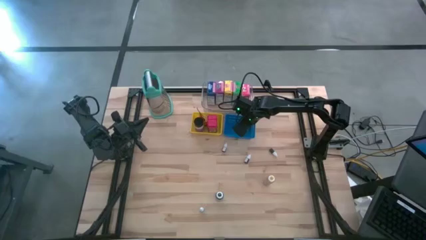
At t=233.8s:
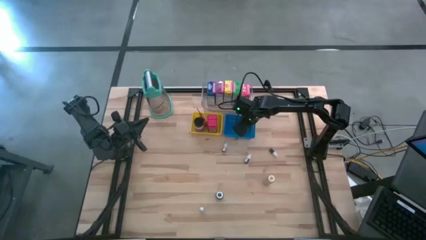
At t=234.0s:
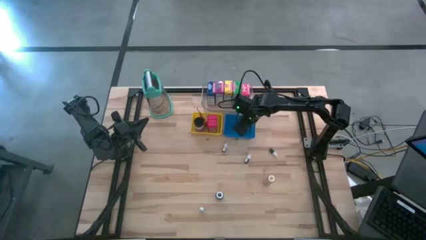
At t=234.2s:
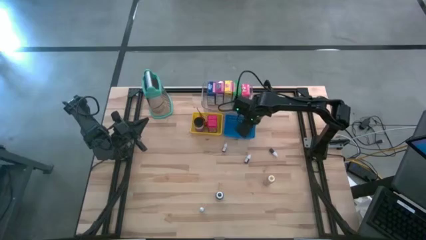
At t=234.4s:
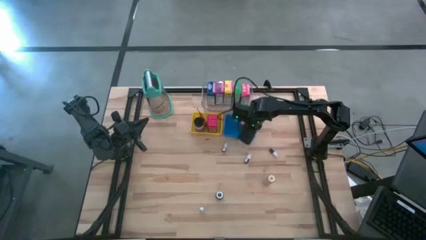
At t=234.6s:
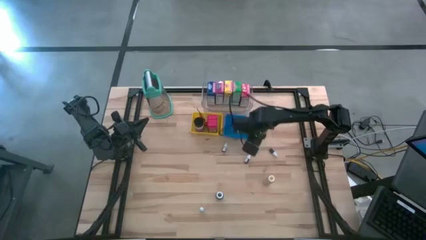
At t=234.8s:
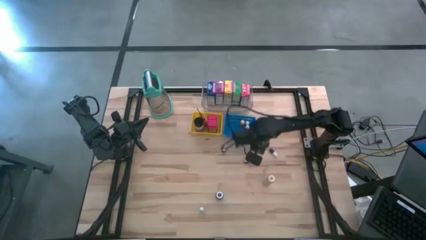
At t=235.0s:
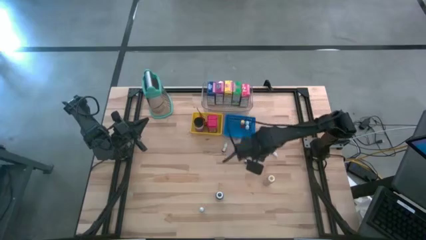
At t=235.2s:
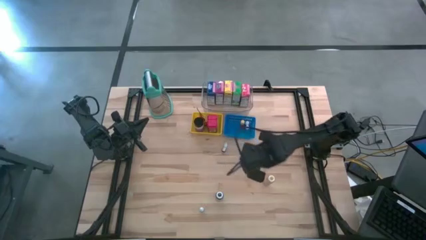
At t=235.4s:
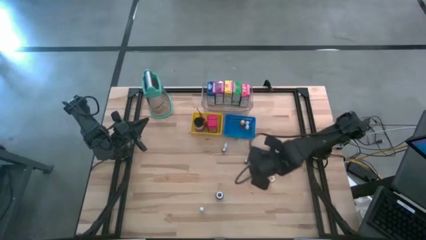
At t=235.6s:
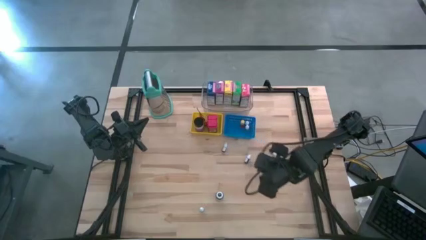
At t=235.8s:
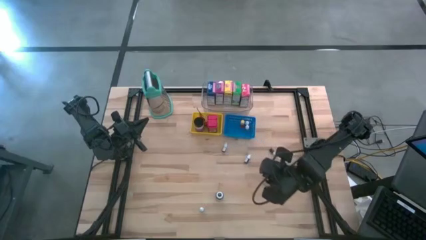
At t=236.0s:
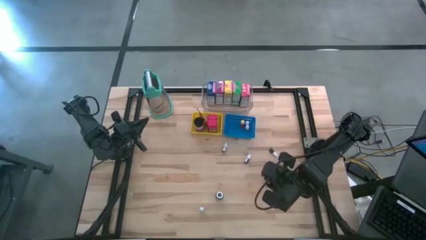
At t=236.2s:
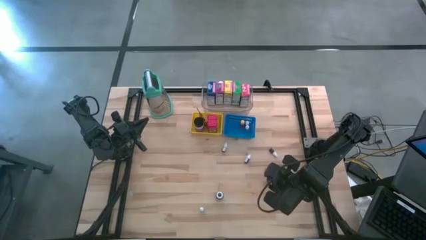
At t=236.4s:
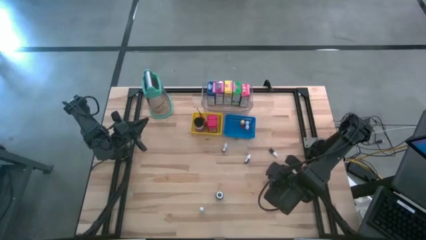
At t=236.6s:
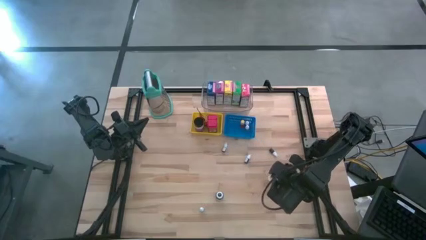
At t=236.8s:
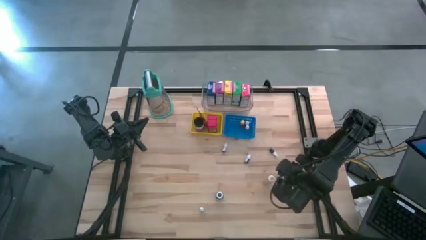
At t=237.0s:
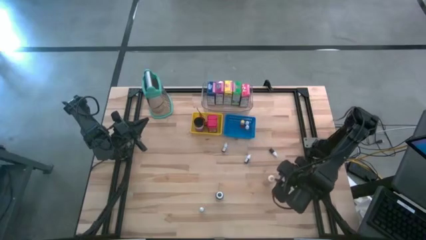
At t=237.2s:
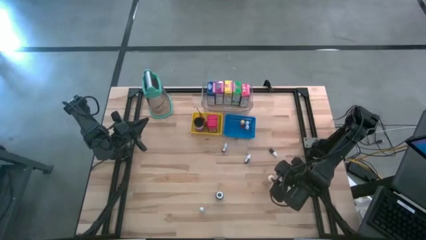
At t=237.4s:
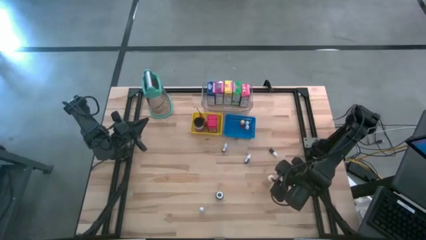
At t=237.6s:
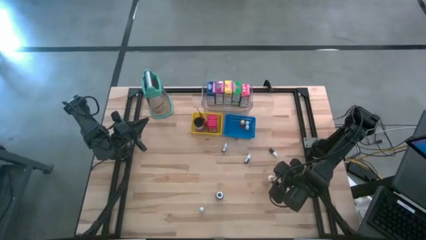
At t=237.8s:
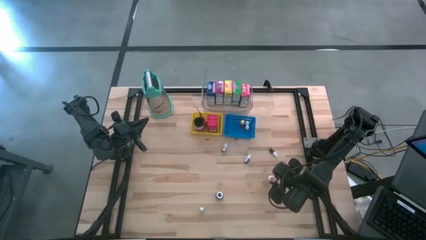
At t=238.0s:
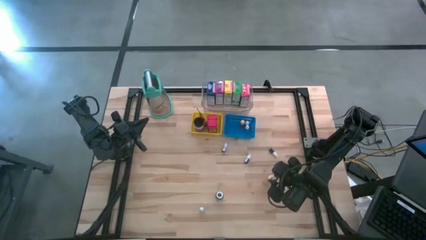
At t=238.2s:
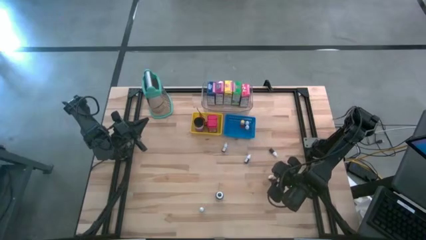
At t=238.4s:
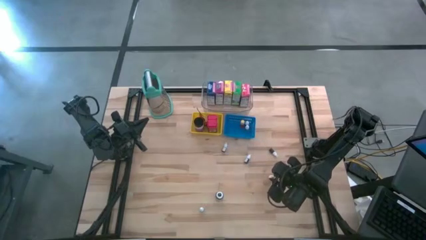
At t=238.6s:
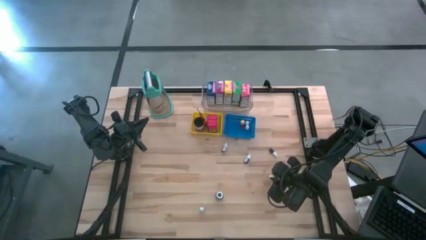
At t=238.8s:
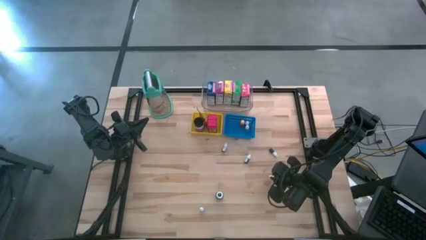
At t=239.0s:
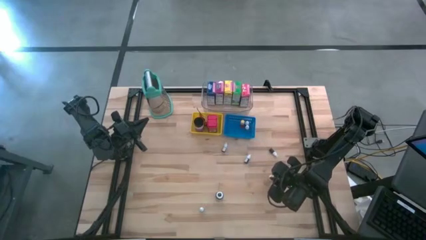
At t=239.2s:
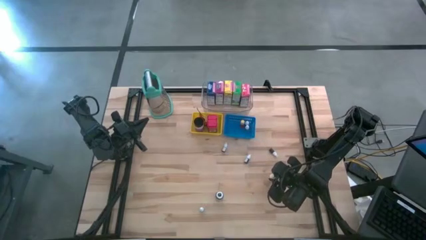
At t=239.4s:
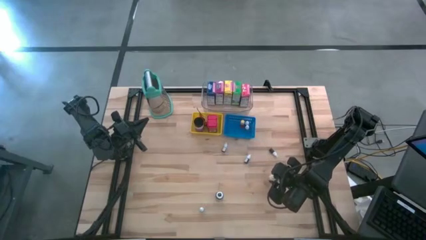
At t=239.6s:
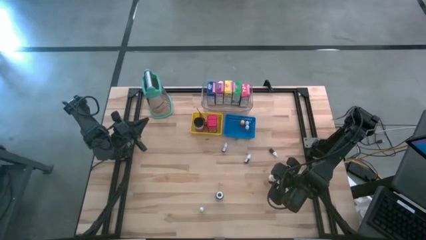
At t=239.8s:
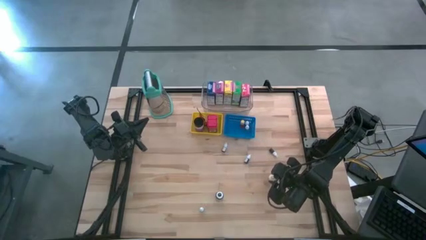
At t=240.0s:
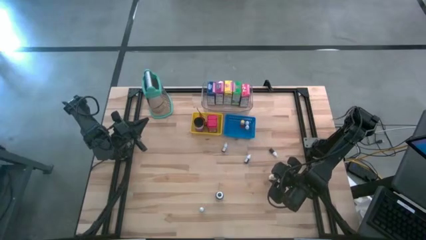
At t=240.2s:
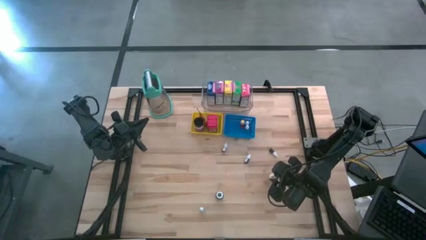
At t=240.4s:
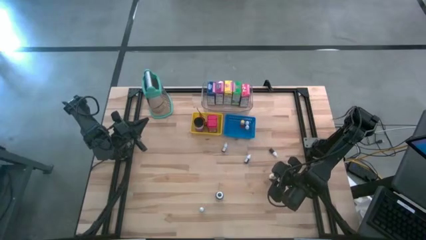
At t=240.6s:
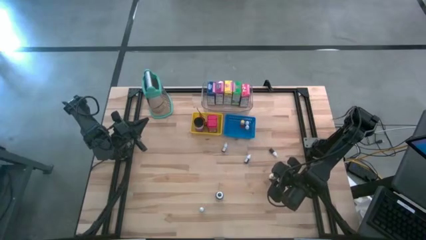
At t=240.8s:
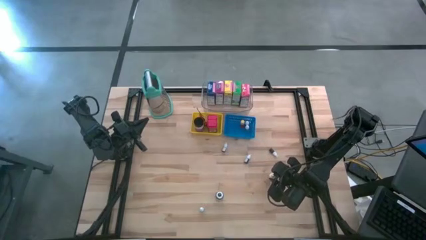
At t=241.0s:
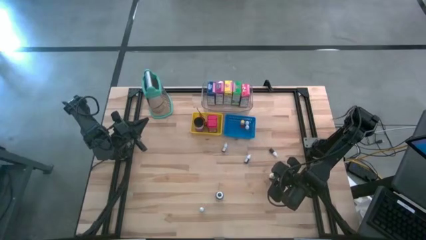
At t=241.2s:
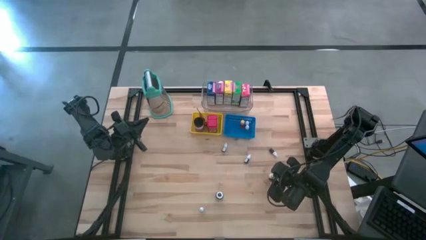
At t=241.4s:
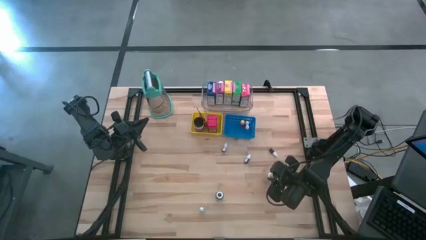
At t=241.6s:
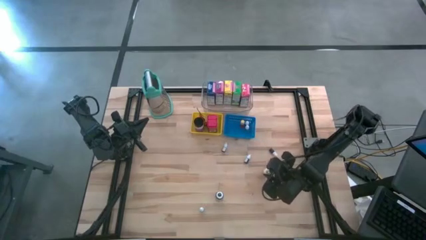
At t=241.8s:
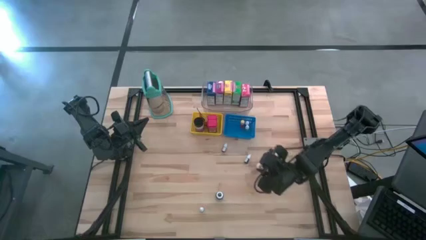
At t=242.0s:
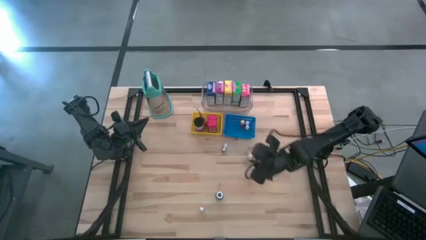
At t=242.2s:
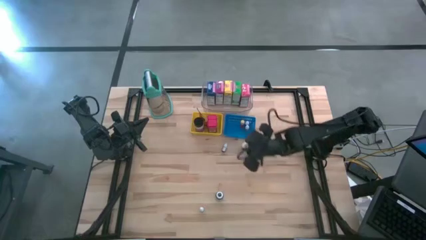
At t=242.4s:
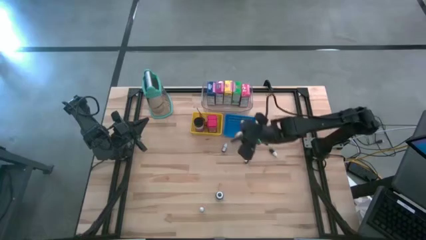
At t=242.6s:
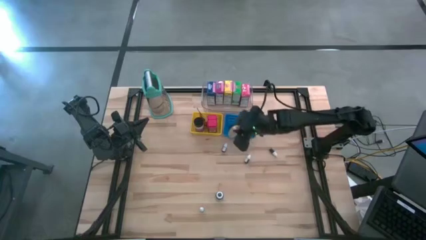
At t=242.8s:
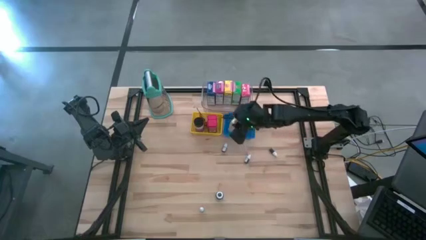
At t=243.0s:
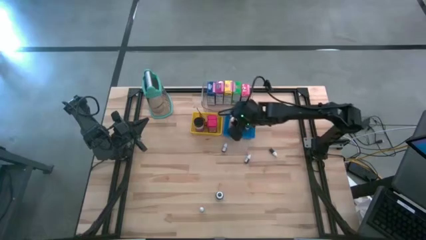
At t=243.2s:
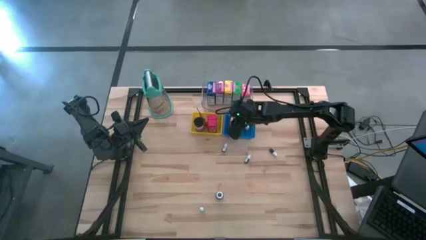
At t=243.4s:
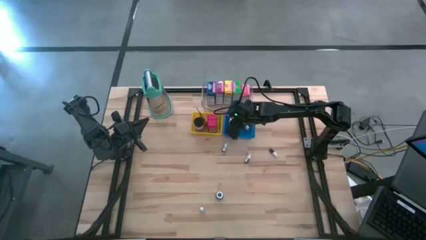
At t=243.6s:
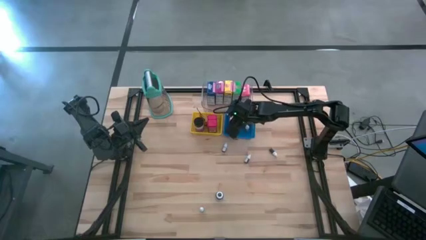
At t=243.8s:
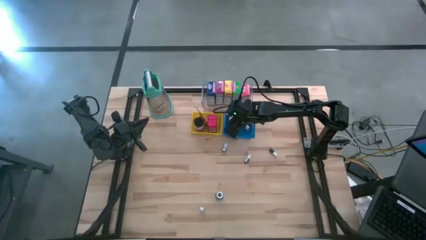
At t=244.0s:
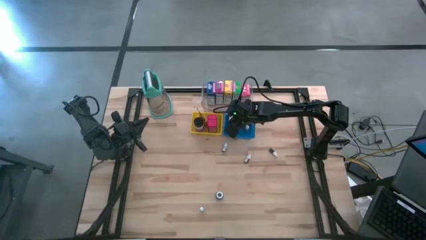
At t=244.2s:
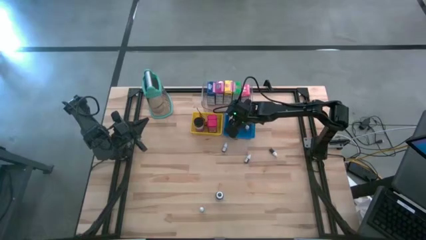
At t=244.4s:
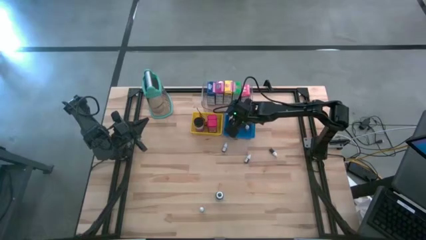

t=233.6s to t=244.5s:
Task: Pick & Place Kitchen Items
Put the yellow food coloring bottle into the blue bin

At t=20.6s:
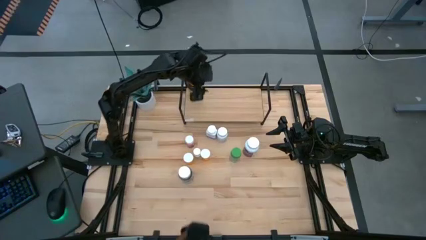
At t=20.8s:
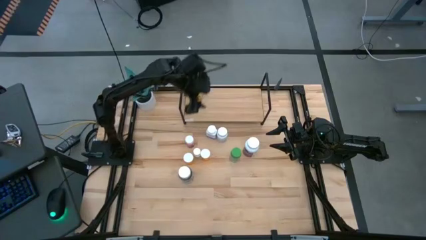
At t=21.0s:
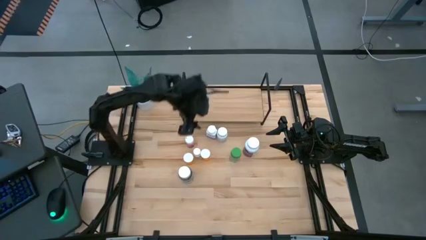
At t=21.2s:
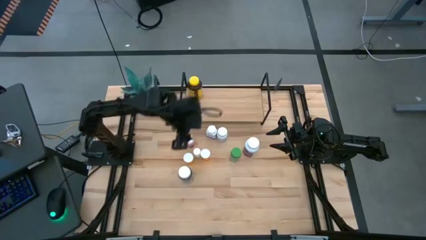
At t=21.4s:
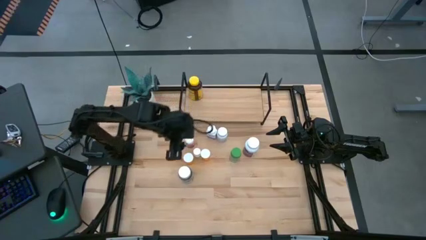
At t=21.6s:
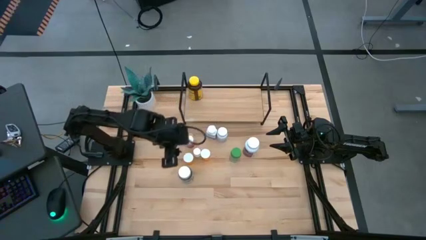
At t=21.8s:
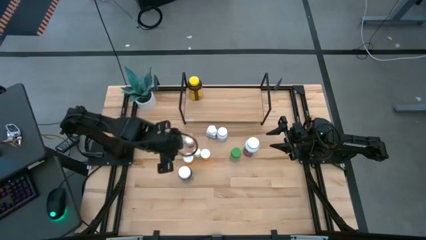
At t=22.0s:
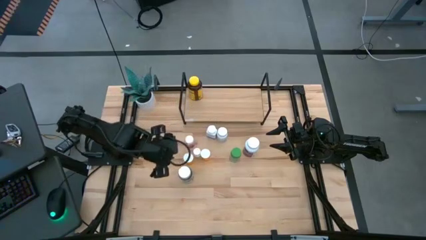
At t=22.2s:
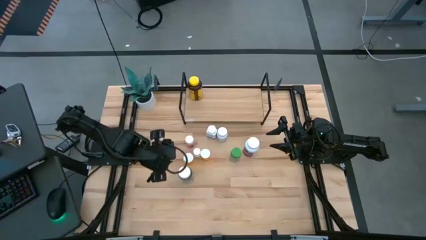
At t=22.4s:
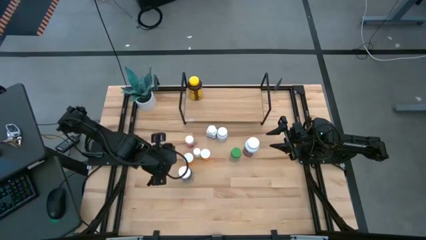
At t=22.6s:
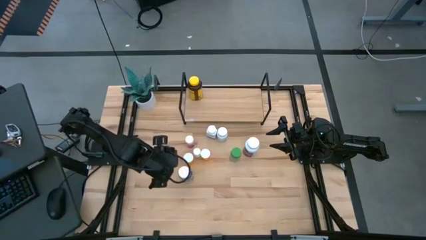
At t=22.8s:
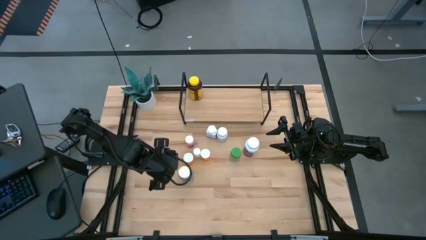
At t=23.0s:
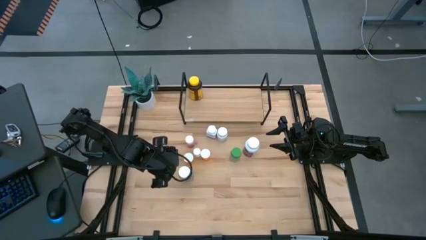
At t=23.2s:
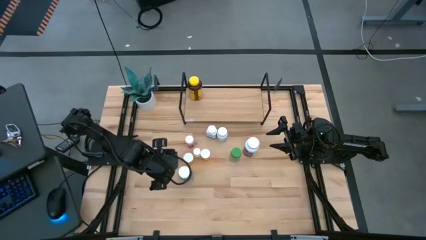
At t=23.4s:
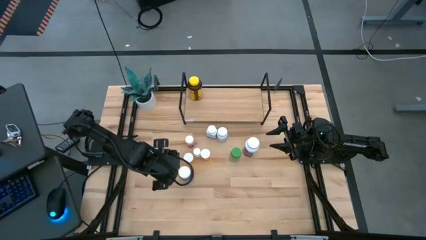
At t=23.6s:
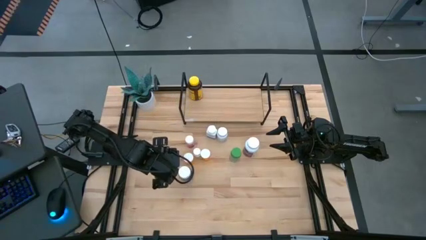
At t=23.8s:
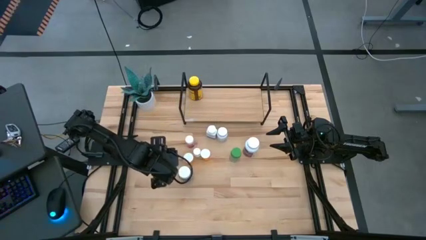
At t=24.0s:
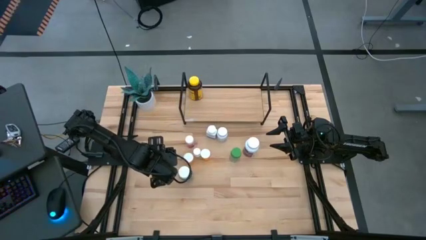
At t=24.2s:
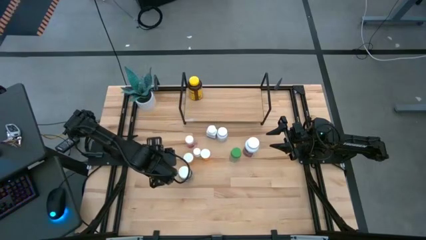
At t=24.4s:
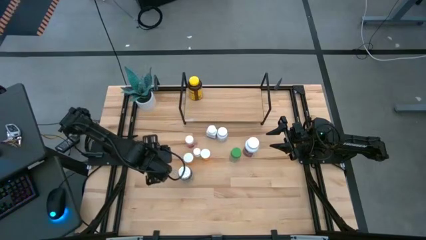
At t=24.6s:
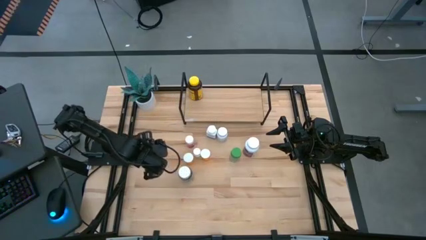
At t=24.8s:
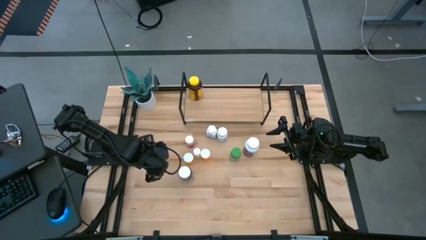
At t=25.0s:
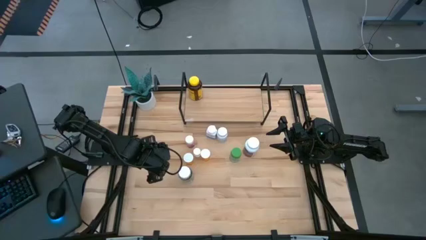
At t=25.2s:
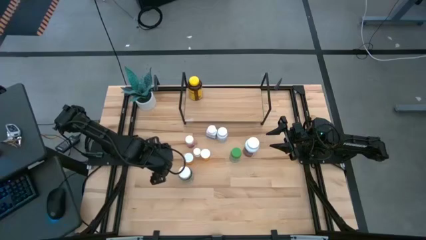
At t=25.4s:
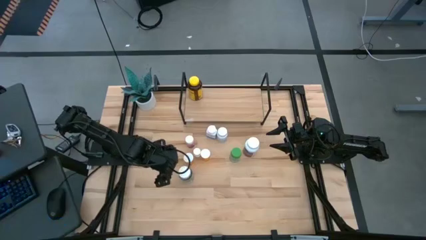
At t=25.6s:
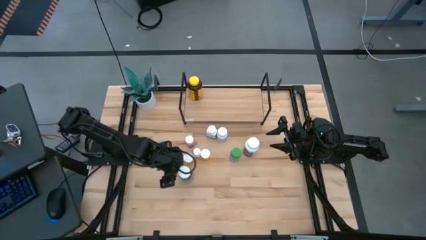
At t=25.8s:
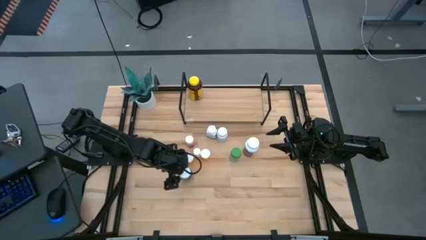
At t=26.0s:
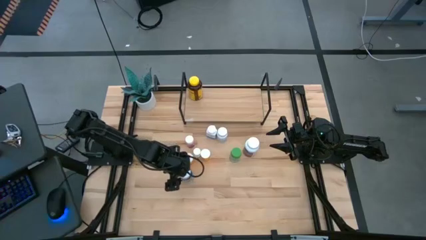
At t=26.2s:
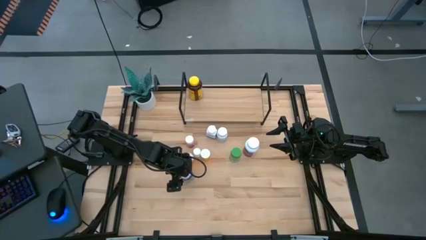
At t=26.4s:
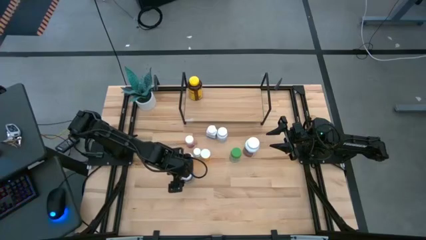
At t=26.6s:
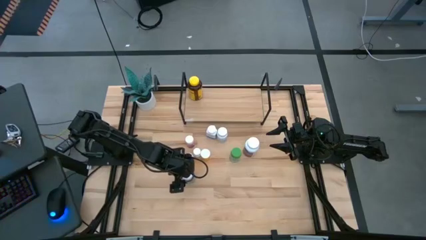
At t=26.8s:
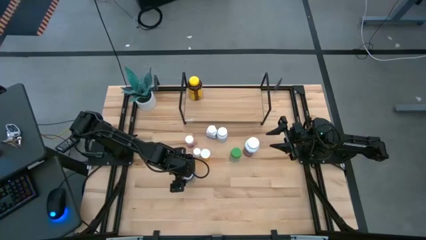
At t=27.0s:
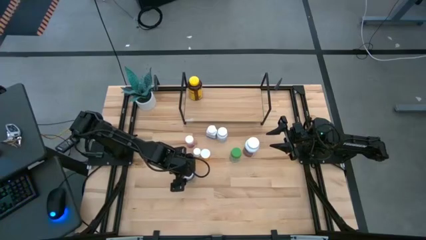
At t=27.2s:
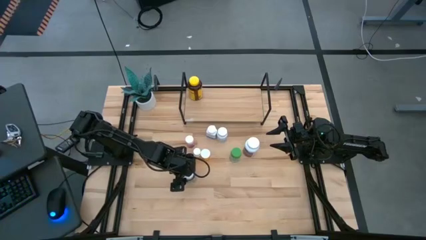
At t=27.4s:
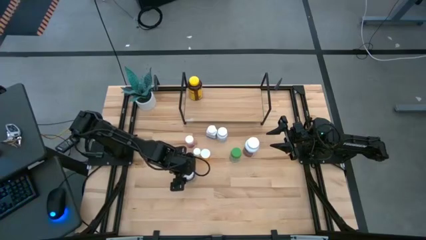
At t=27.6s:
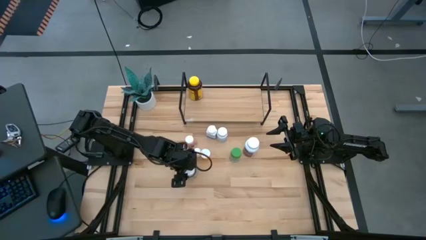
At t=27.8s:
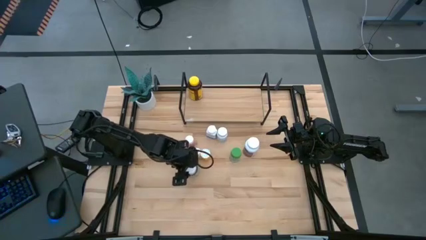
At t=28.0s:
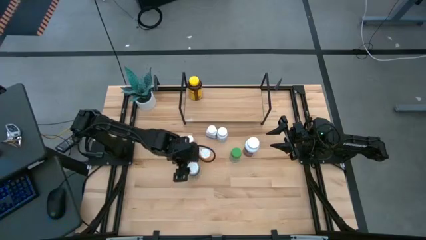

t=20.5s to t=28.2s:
Task: Pick and place medicine bottles onto shelf by color
Put the transparent medicine bottle on the shelf
